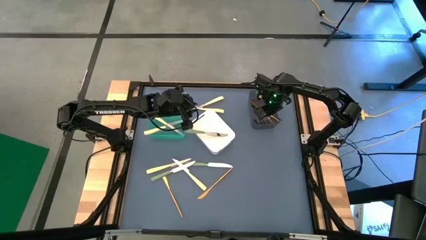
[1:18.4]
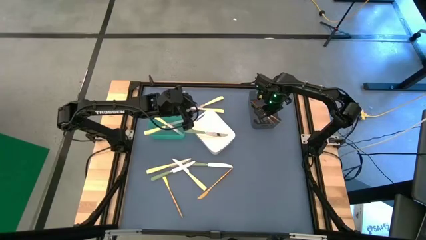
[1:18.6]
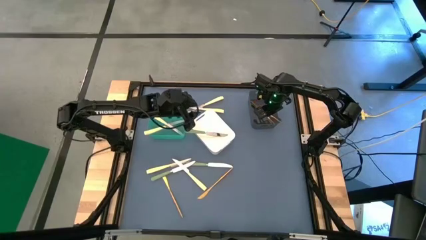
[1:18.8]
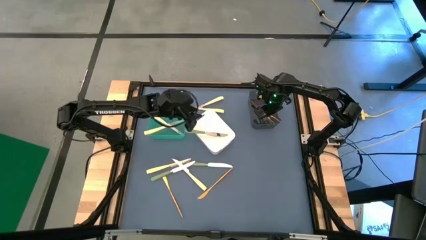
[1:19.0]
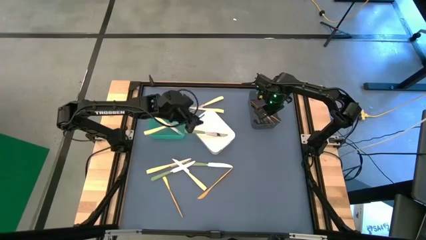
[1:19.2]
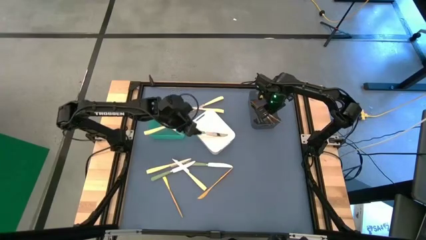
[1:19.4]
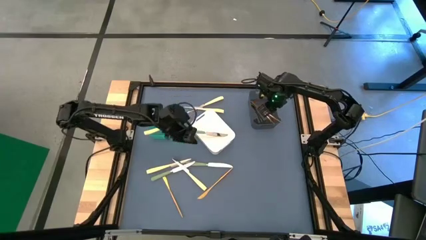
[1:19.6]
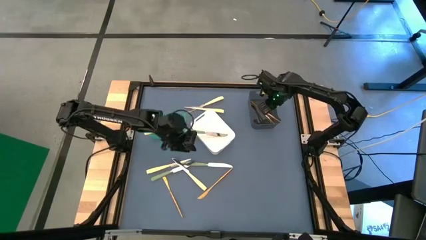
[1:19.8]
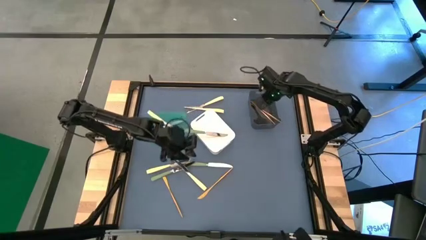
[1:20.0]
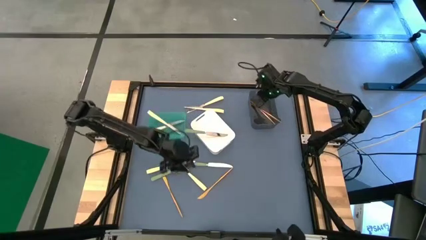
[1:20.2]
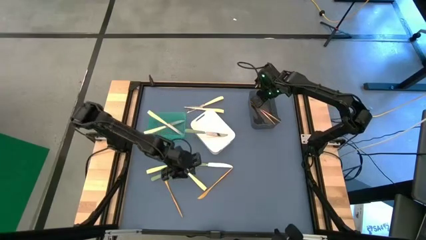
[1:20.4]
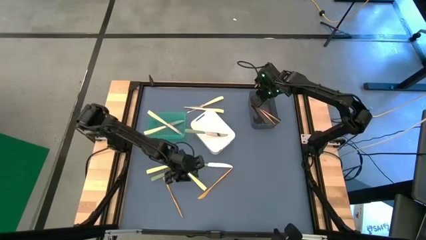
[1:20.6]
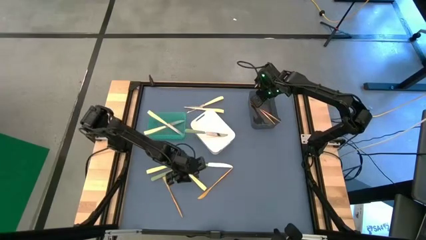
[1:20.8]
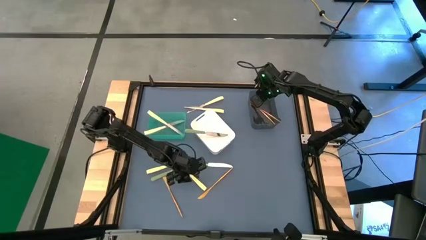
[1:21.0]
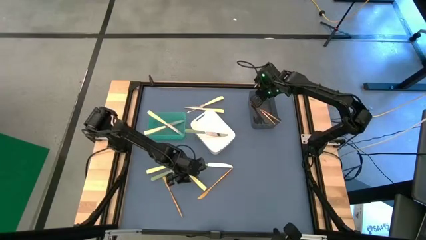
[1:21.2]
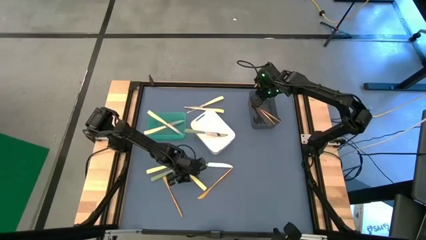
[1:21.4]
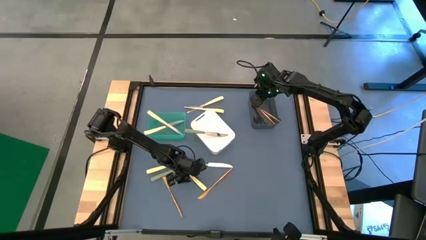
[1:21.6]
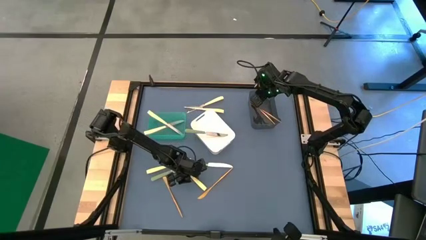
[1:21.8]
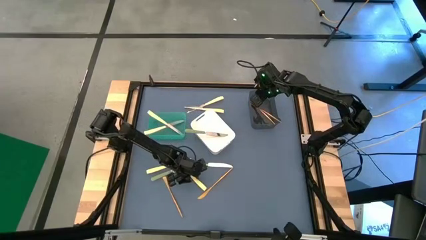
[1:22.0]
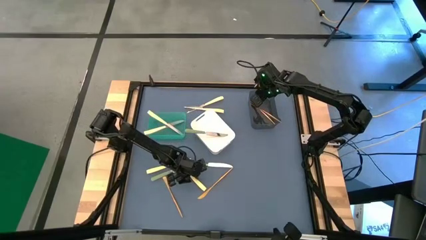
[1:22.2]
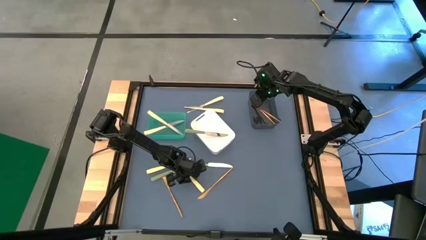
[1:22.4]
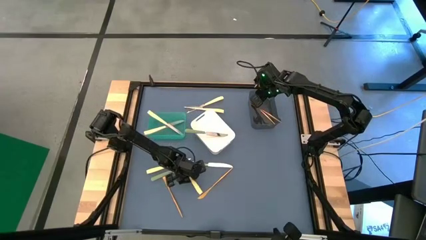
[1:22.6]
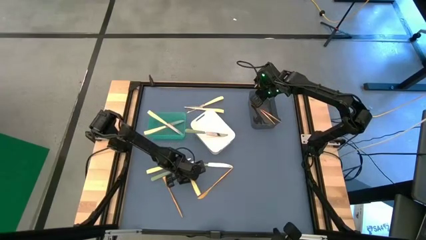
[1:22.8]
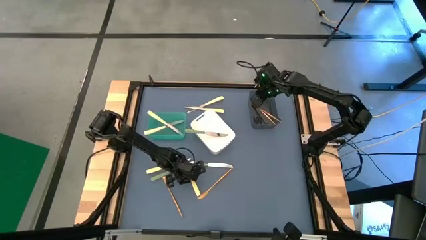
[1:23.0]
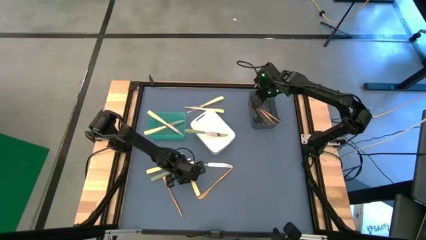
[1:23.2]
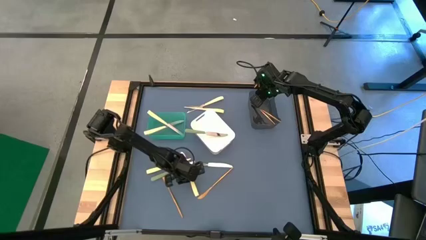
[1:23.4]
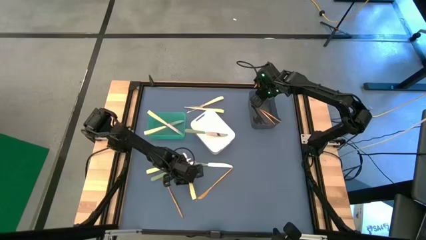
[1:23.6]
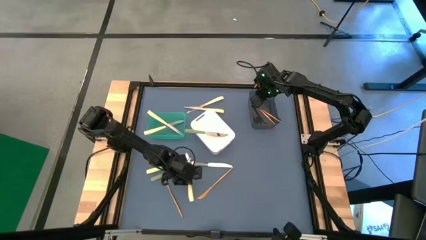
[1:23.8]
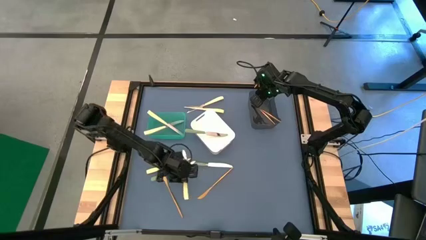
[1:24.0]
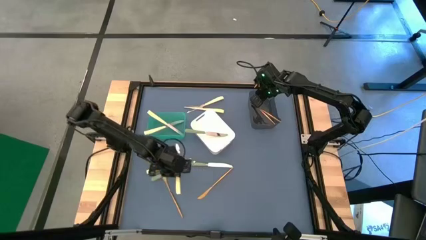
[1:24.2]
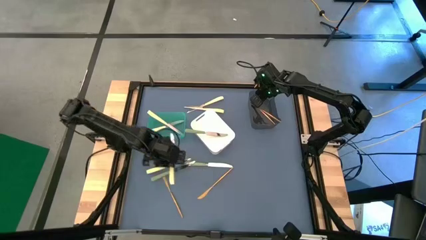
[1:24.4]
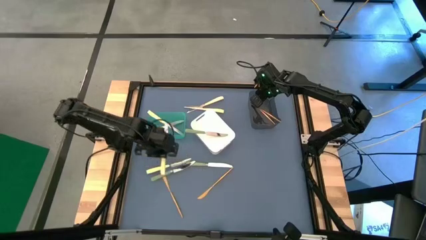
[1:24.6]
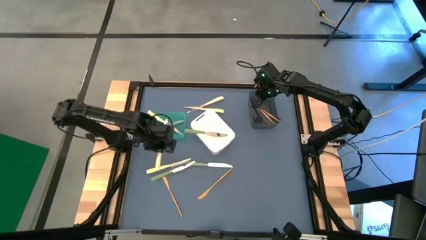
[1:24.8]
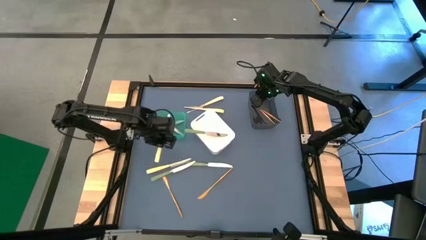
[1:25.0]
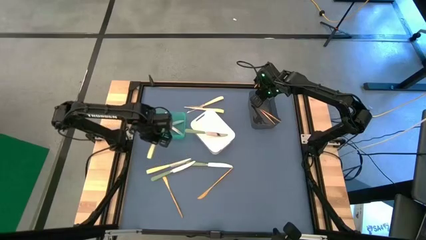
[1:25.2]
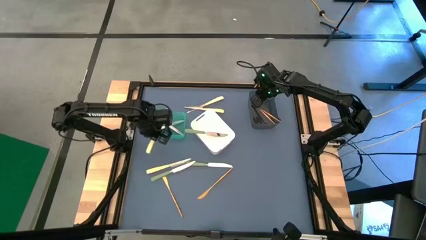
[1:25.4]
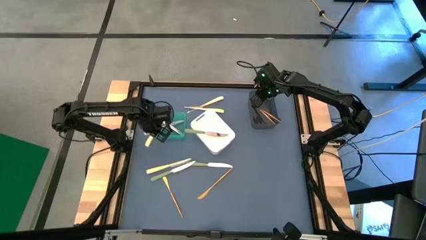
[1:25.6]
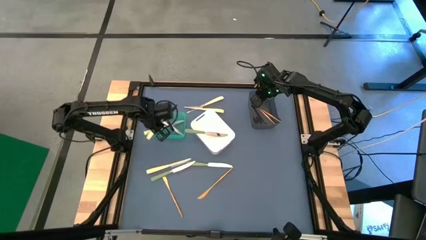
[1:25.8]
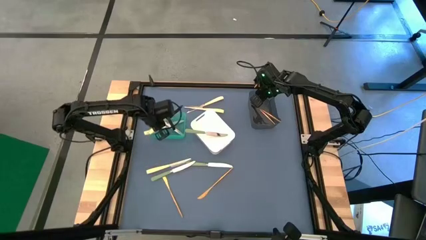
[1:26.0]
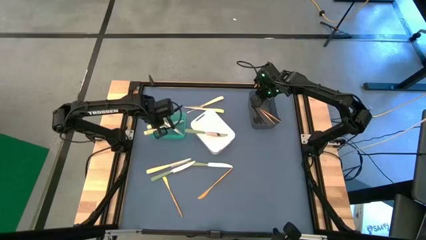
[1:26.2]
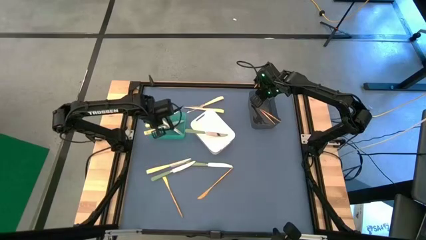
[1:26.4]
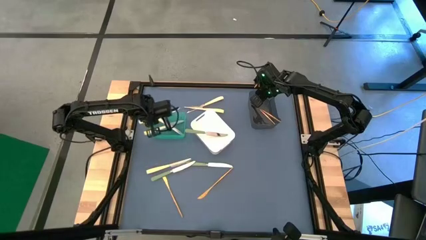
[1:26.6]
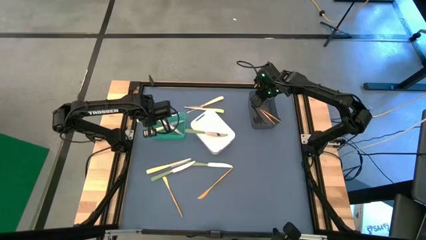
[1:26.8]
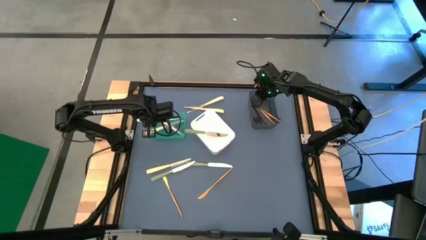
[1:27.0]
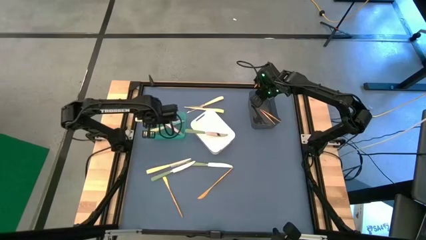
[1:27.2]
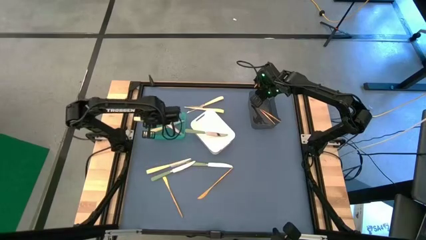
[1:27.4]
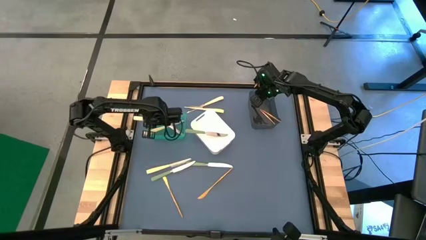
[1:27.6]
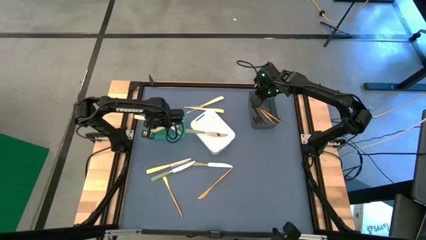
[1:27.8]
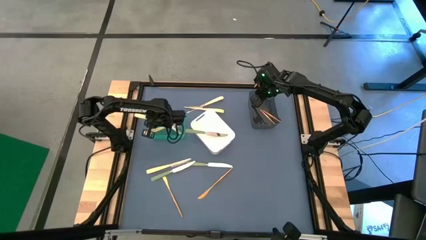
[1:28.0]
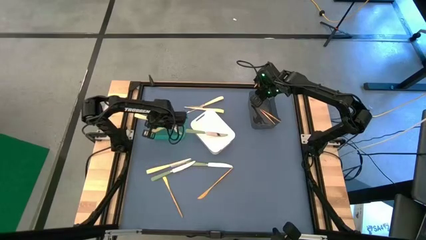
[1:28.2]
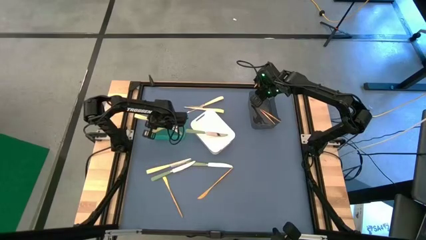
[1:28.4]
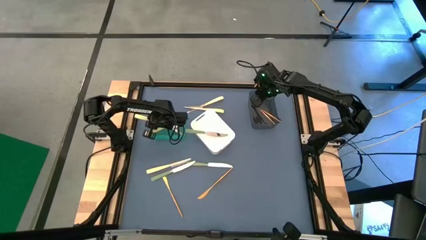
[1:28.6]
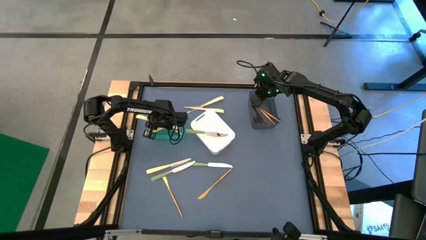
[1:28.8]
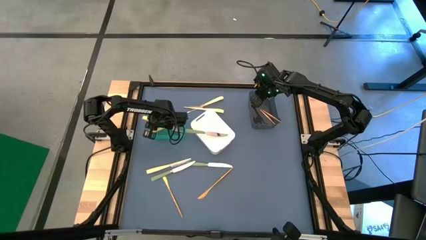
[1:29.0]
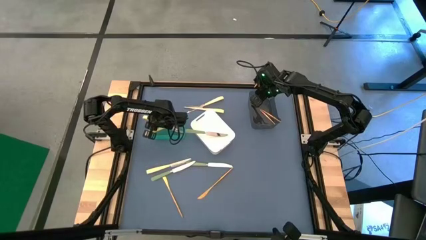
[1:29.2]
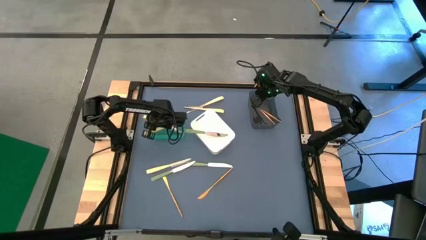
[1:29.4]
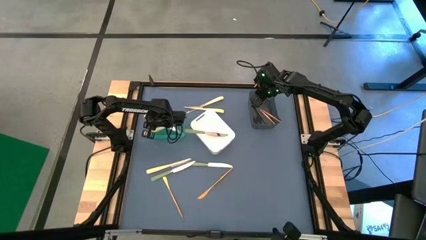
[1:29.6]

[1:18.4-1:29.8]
Task: Sort silverware by color (type)
Put the bottom yellow table knife into the green bin

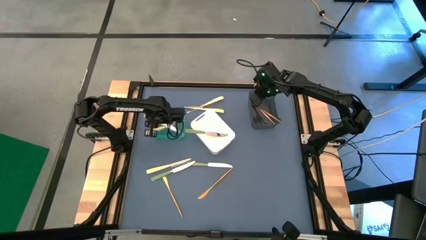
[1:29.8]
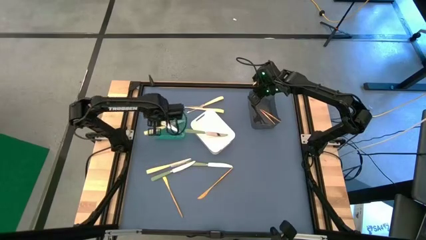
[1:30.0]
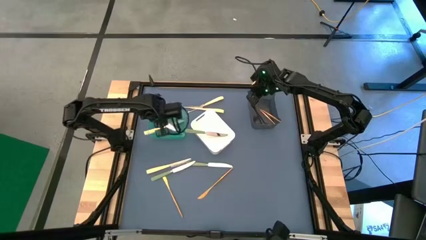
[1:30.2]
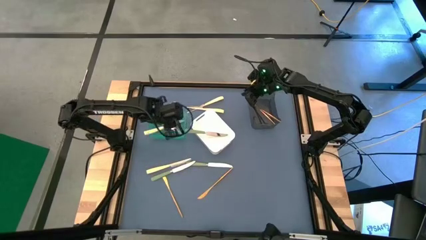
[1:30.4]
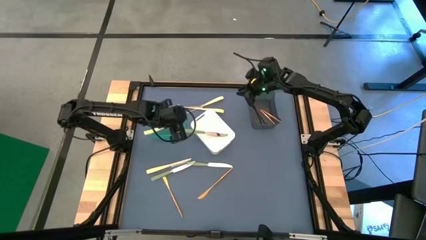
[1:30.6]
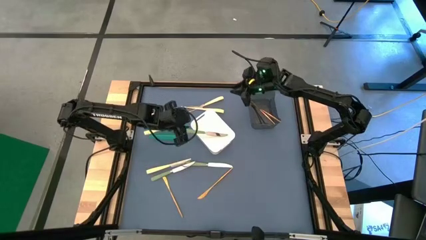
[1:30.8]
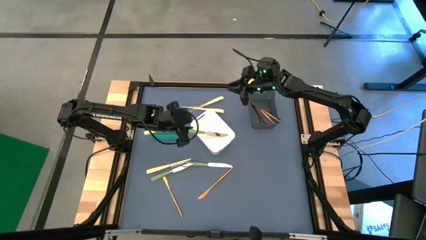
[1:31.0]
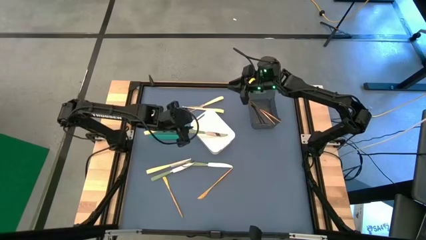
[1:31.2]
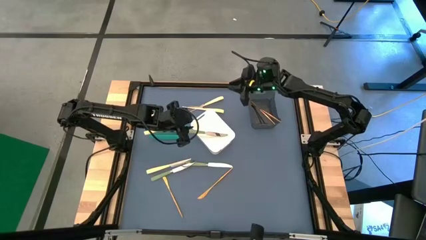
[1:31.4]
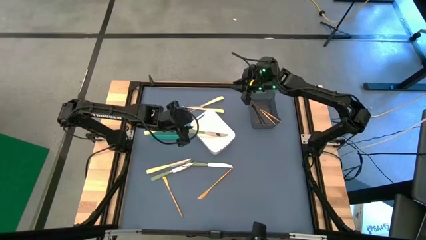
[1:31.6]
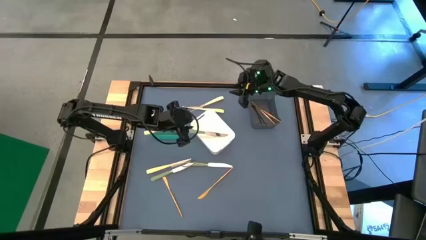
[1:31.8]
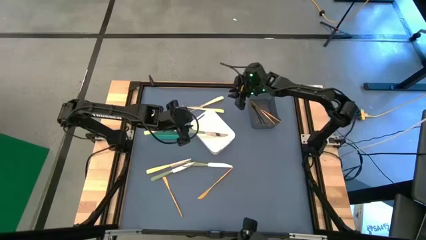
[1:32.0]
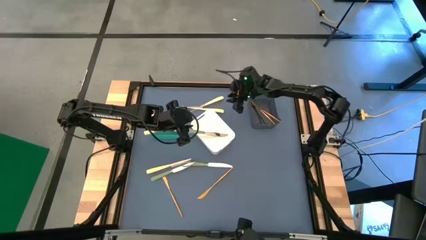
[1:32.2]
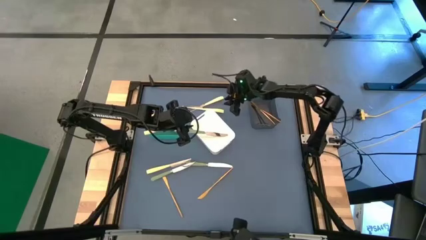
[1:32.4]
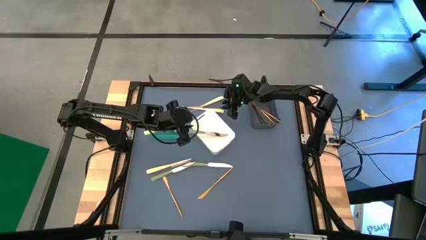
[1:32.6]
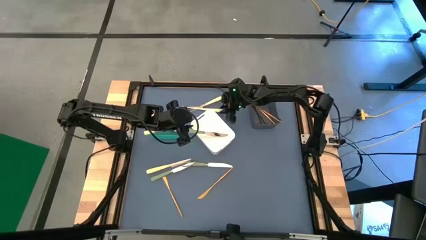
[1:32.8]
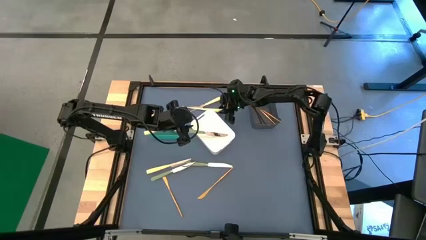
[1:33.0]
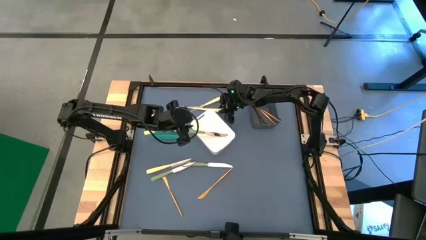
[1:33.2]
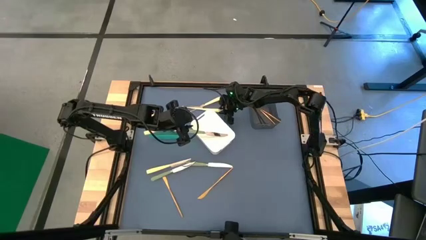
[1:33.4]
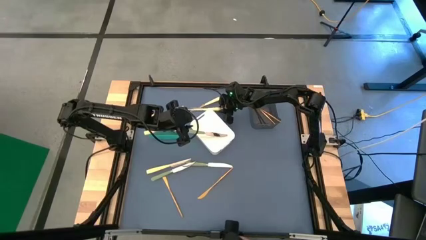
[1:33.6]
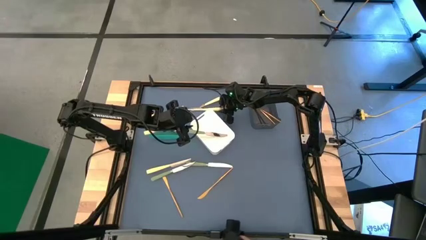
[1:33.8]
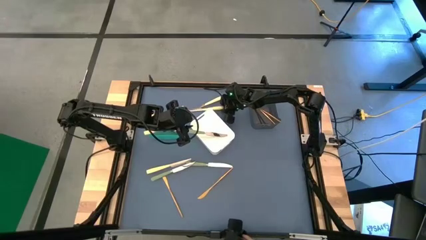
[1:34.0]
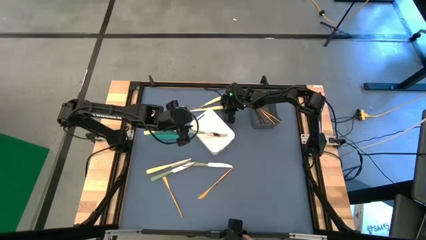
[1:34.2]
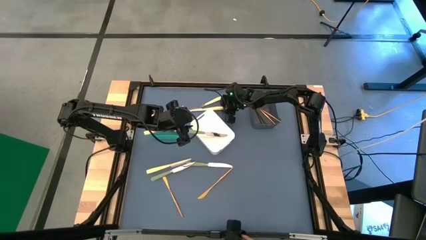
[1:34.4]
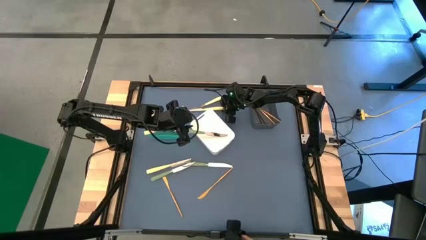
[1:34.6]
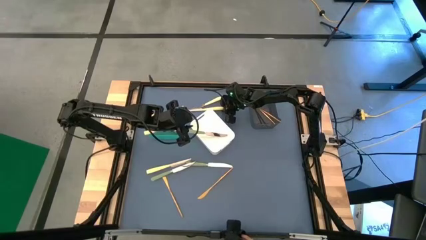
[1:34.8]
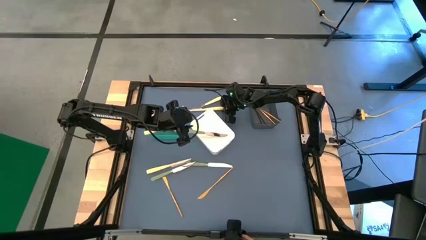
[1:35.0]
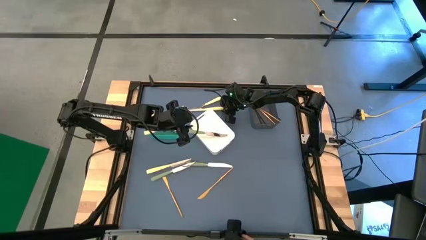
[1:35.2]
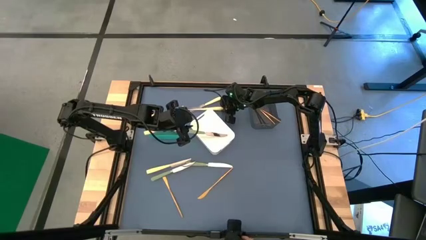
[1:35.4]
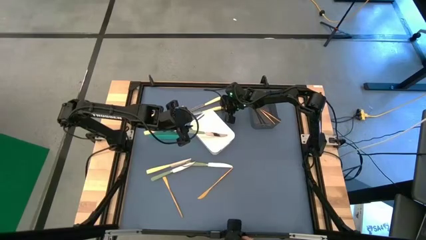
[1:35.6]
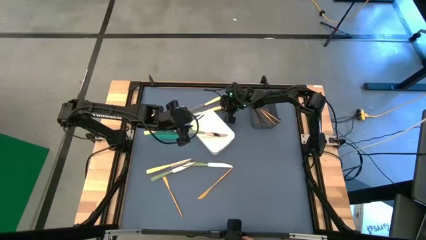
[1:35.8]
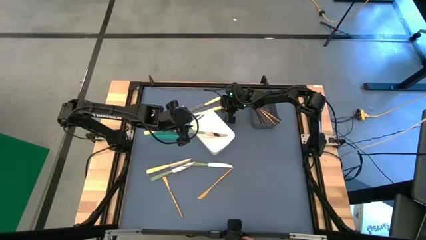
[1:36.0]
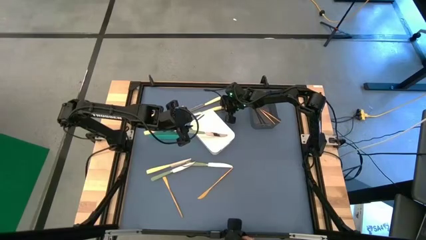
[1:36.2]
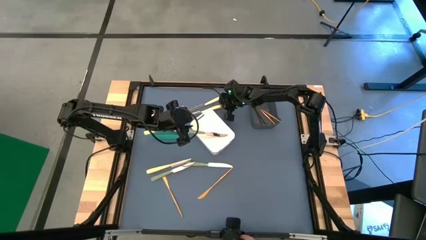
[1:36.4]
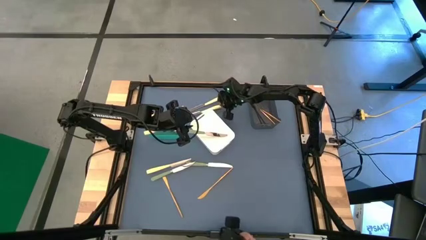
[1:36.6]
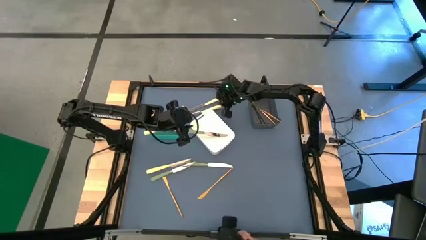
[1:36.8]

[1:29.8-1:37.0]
Put the top yellow table knife into the green bin
